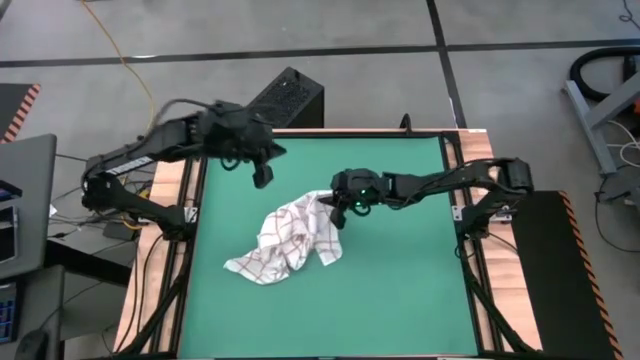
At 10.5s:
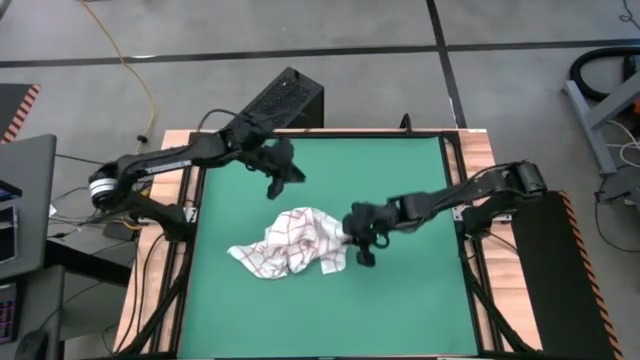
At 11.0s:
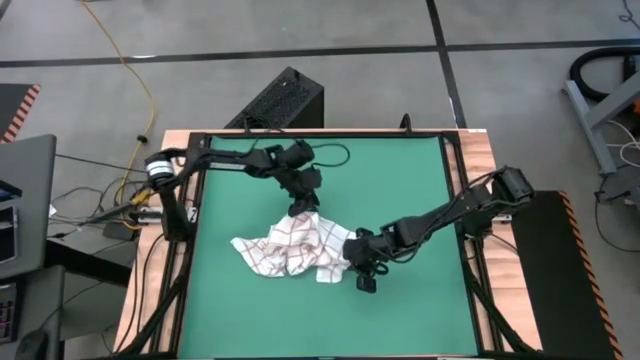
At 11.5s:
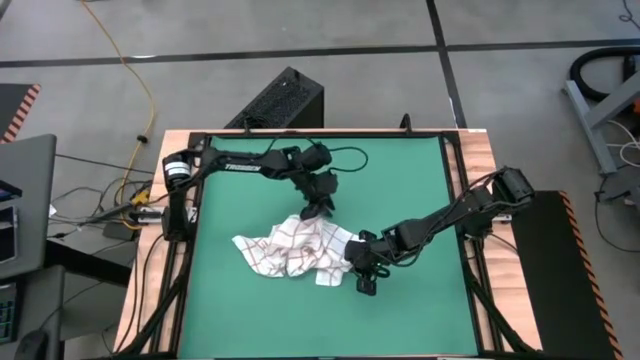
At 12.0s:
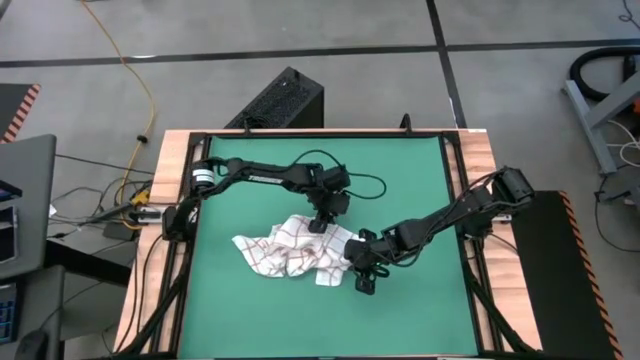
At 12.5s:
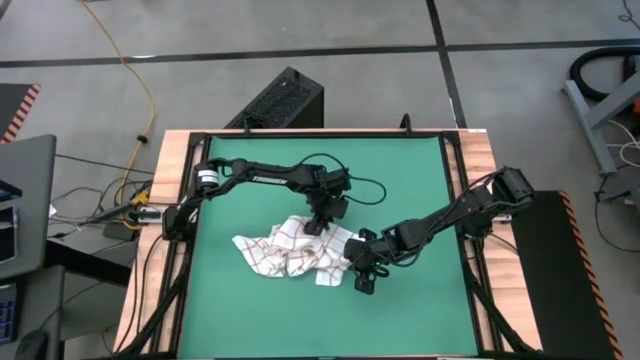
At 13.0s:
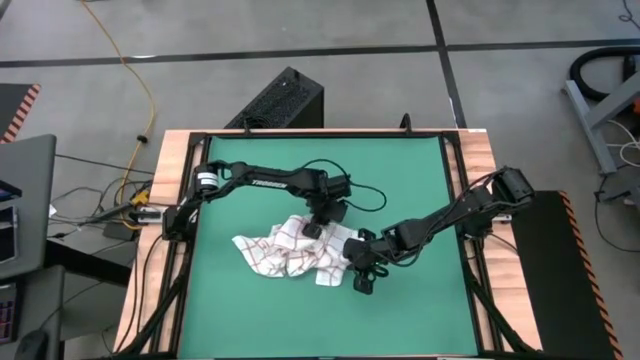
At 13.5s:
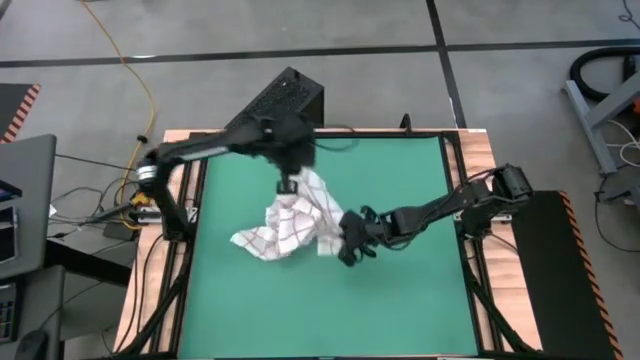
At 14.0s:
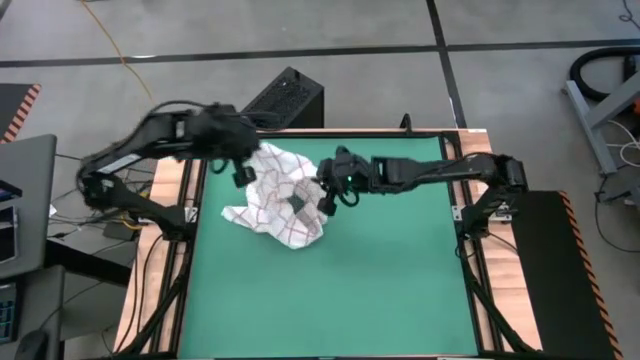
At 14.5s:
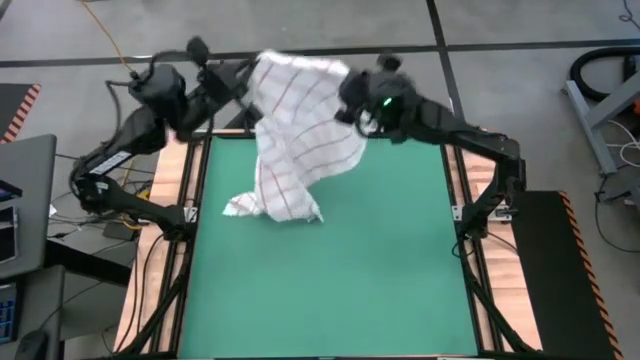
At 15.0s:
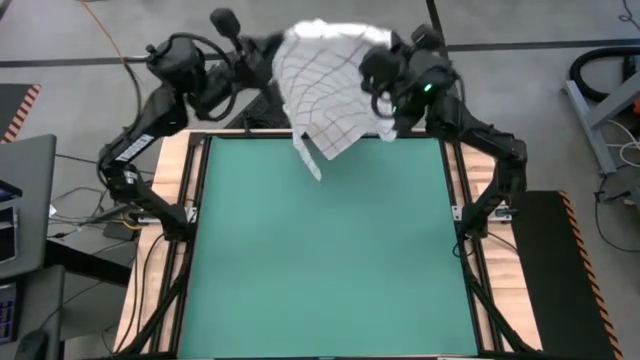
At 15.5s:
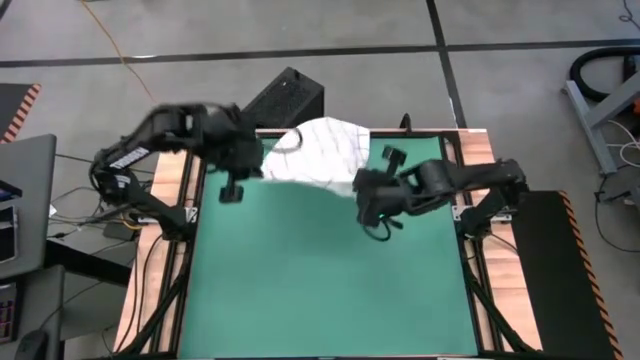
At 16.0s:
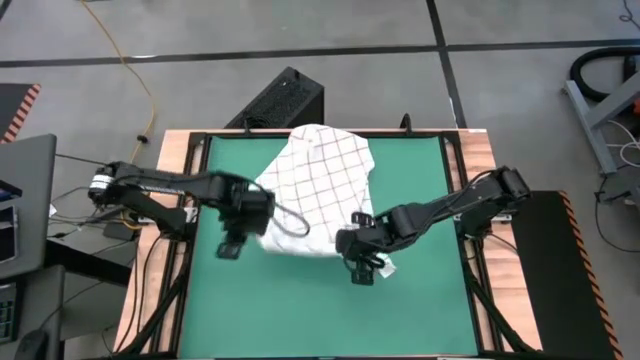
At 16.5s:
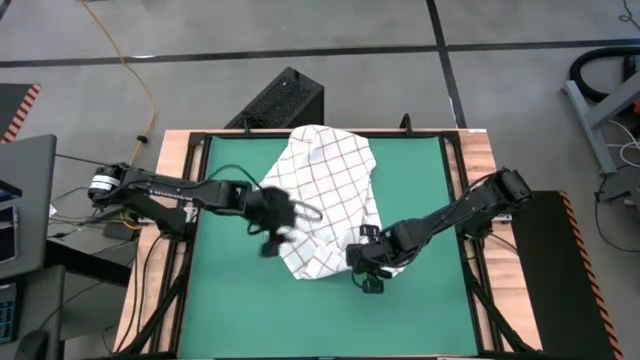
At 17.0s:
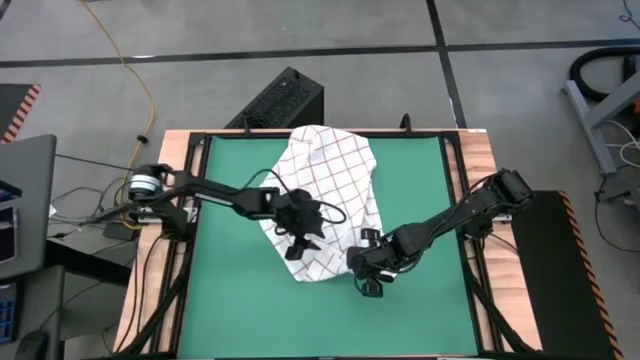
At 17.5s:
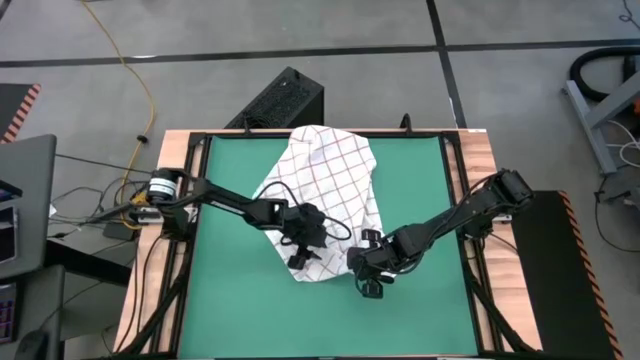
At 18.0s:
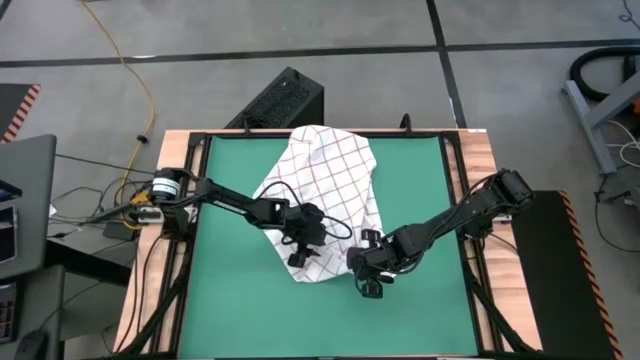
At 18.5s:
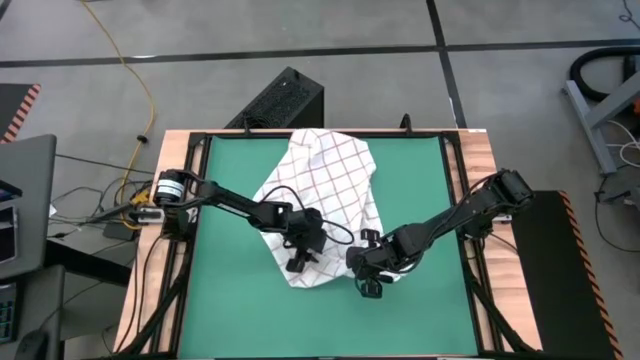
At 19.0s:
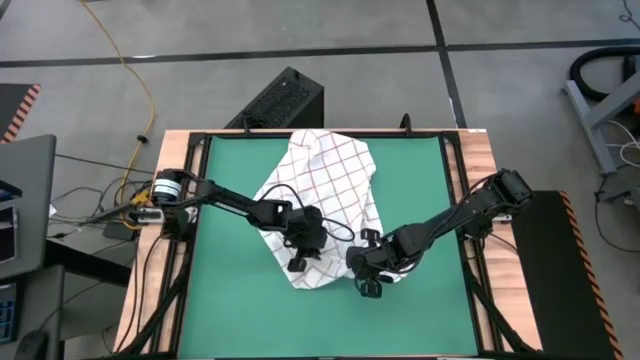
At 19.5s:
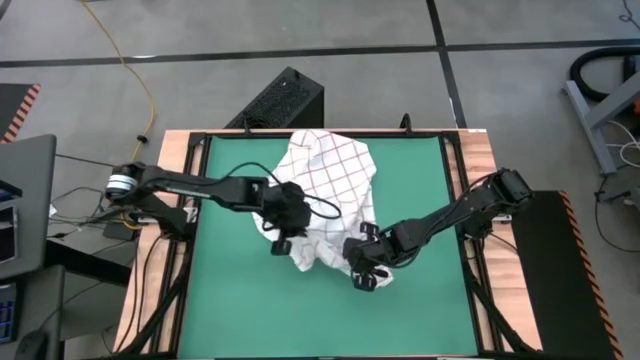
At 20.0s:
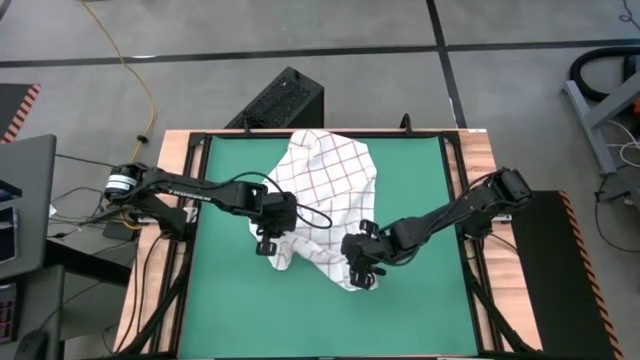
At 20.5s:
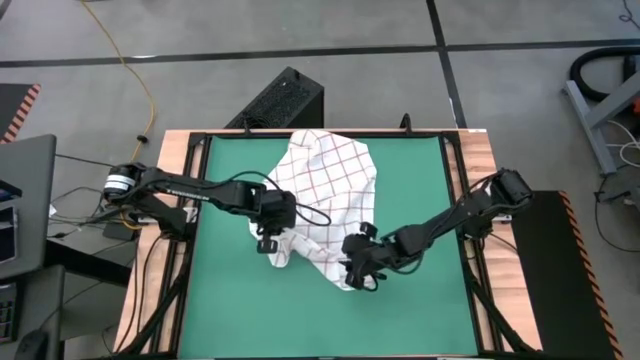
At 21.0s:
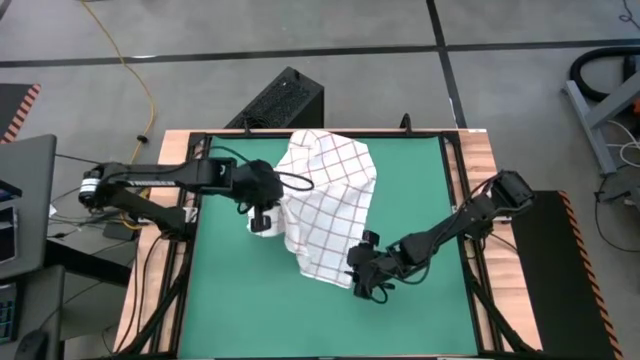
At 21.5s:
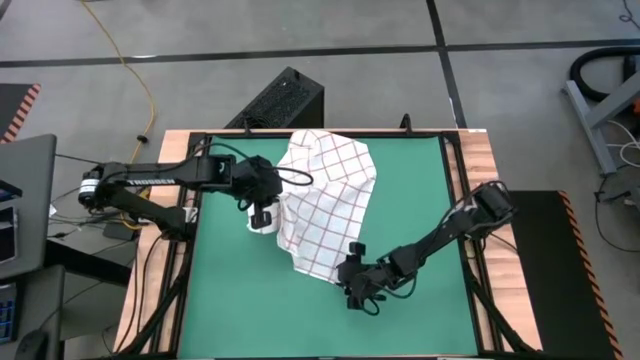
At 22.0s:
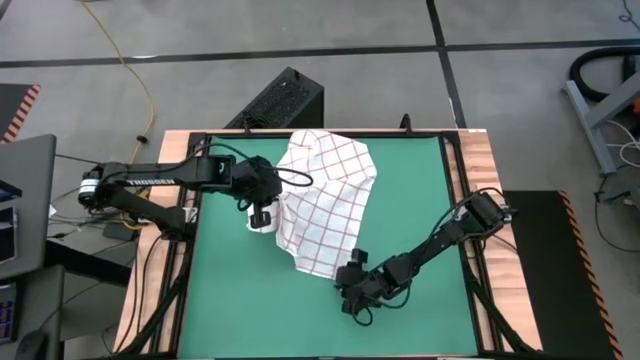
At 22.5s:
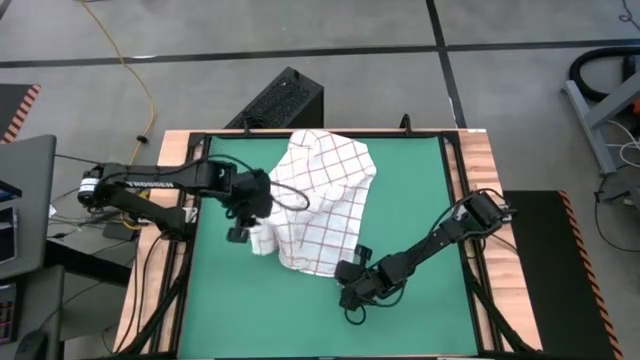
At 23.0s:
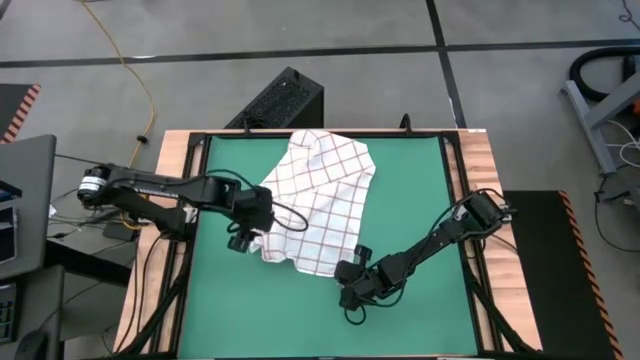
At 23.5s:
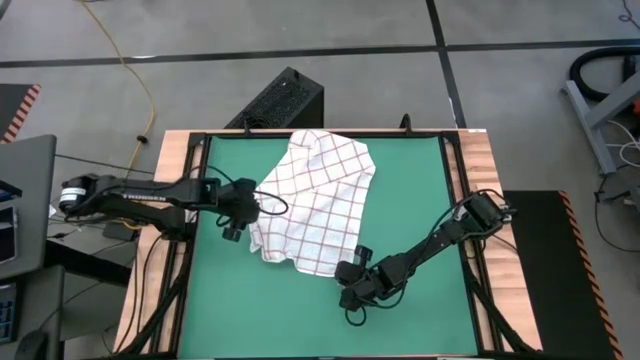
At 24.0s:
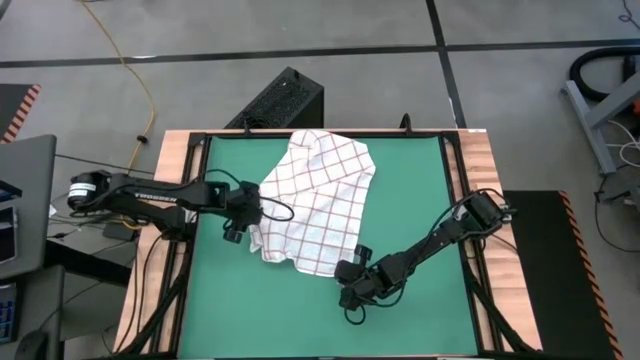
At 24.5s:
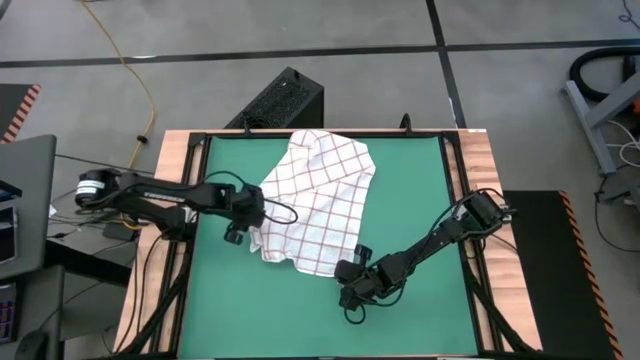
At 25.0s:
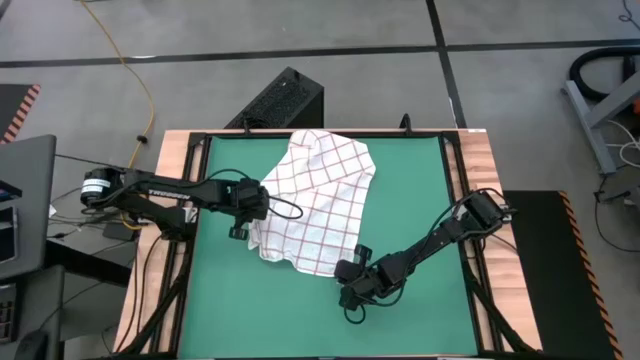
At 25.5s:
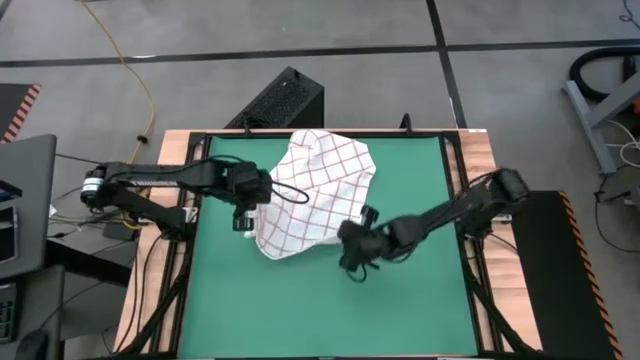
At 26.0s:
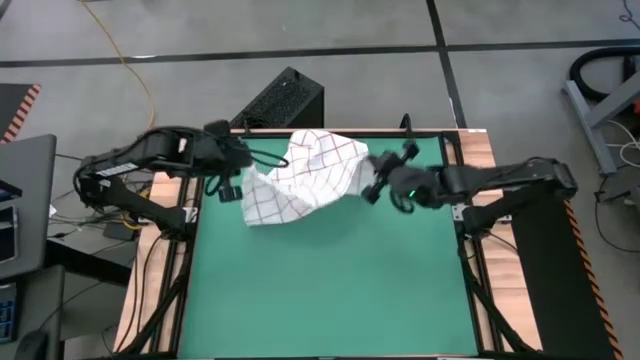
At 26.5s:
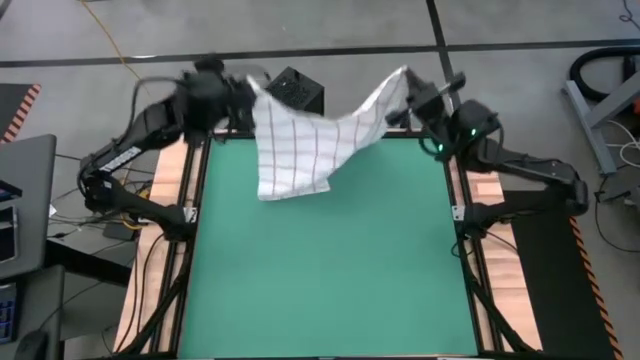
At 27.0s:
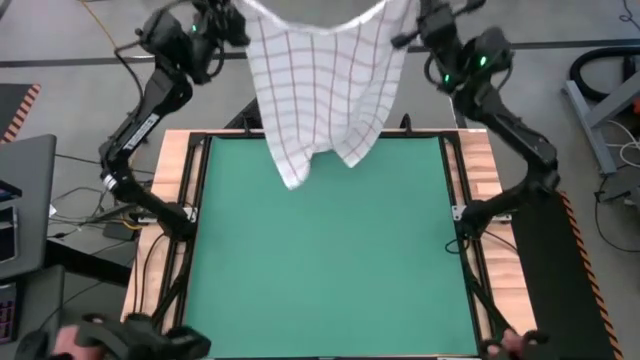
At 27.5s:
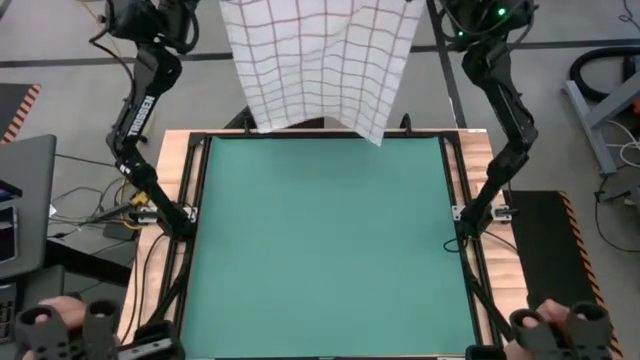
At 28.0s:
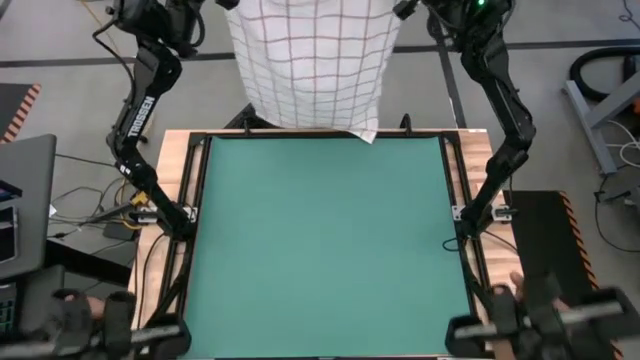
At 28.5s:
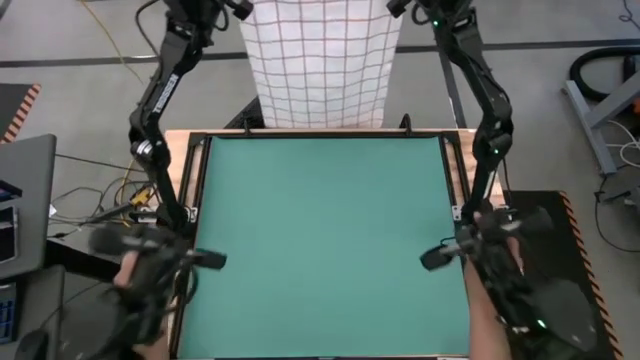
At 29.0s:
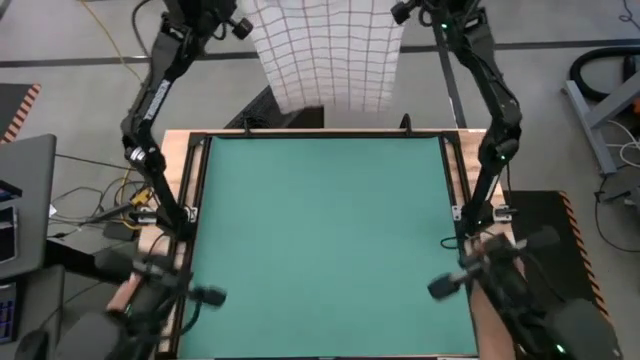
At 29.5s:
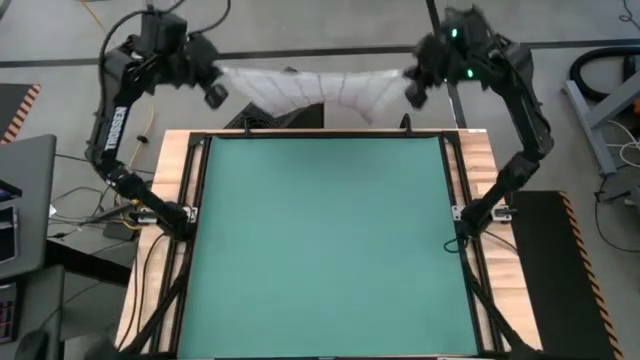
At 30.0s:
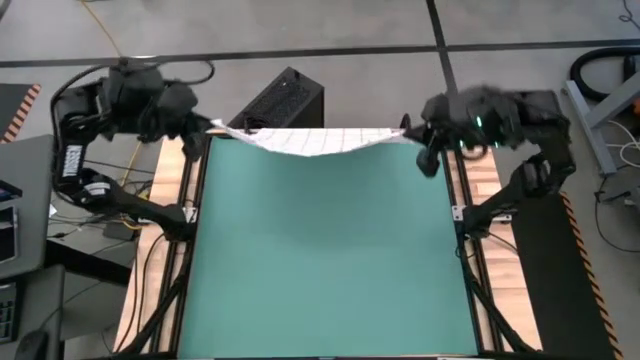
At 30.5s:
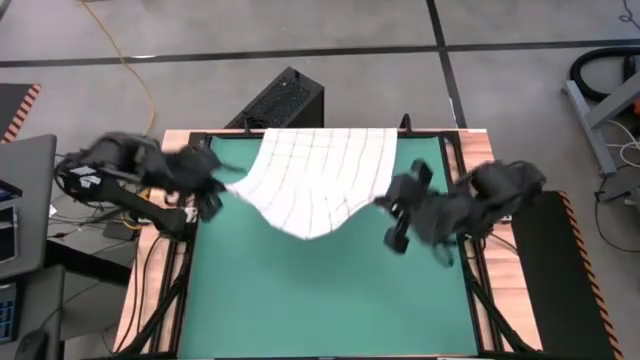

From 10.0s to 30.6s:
Task: Roll towel
Roll the white towel
